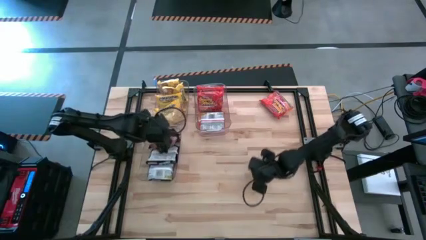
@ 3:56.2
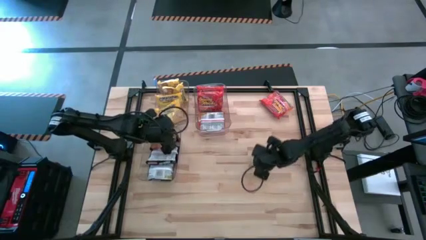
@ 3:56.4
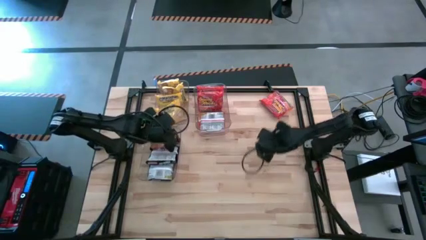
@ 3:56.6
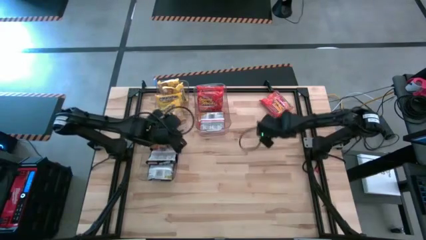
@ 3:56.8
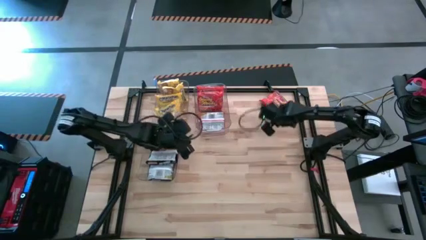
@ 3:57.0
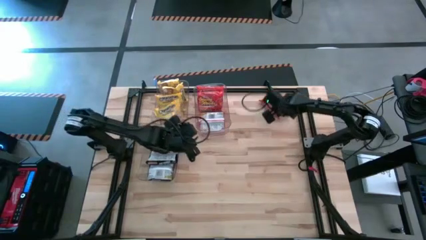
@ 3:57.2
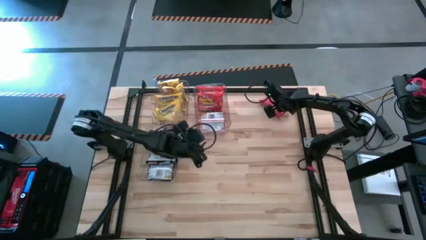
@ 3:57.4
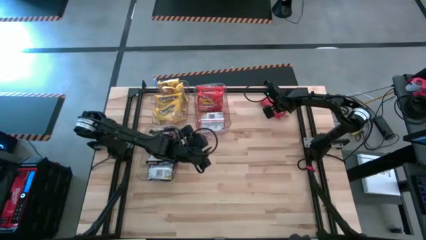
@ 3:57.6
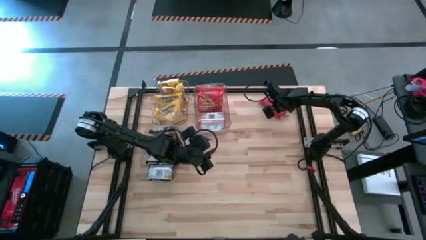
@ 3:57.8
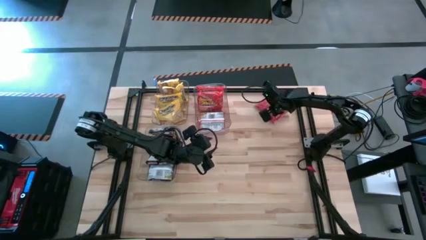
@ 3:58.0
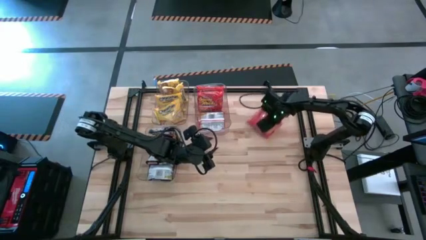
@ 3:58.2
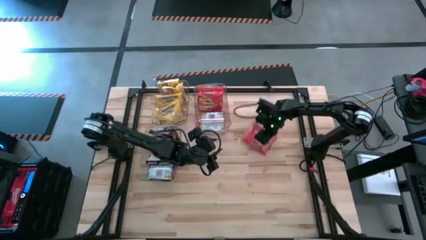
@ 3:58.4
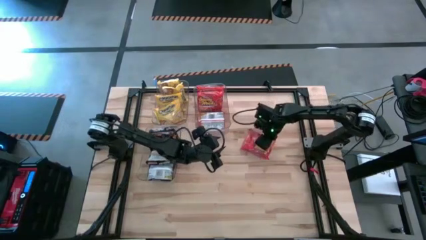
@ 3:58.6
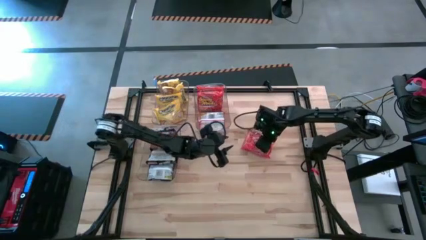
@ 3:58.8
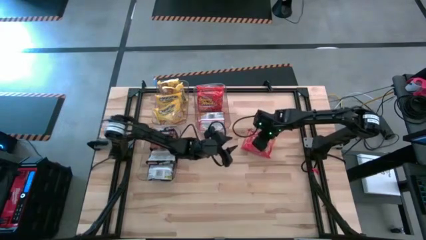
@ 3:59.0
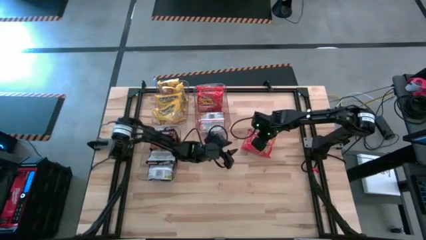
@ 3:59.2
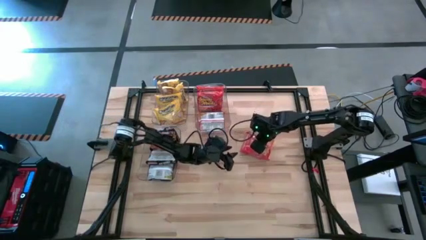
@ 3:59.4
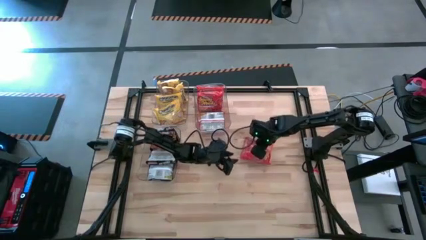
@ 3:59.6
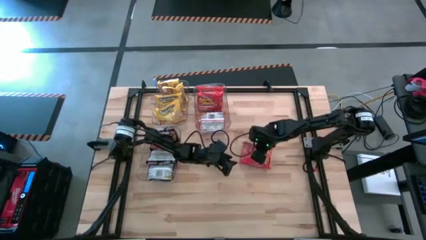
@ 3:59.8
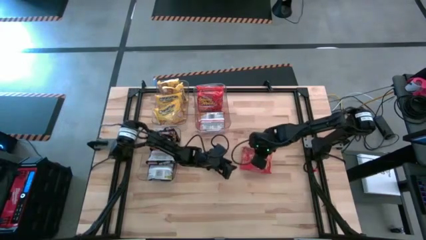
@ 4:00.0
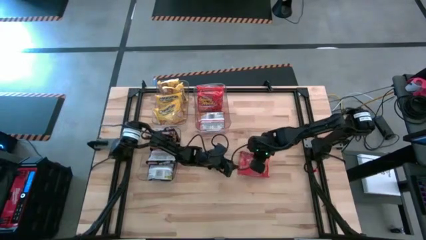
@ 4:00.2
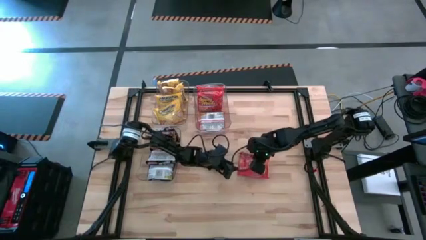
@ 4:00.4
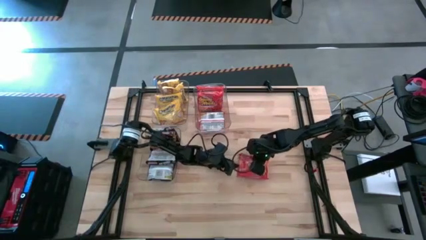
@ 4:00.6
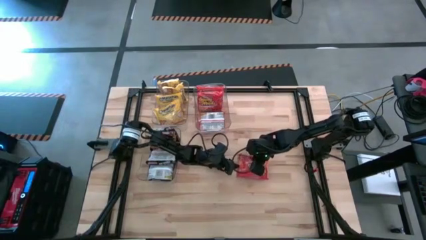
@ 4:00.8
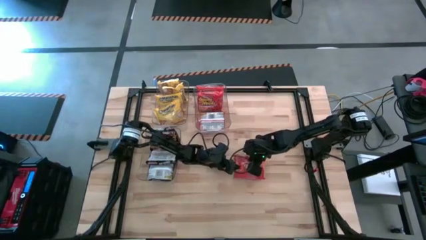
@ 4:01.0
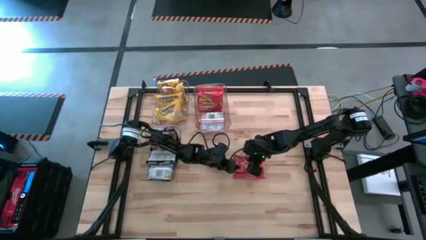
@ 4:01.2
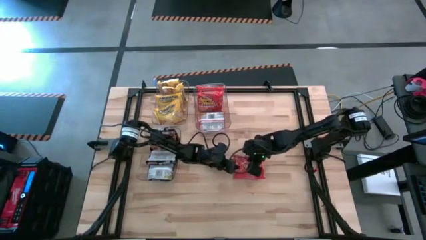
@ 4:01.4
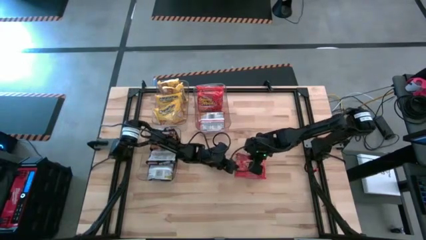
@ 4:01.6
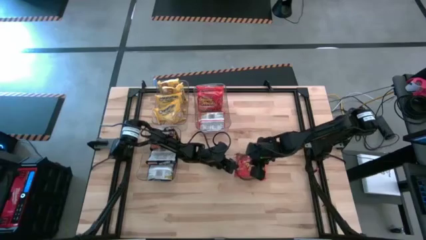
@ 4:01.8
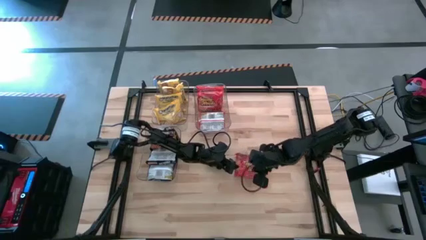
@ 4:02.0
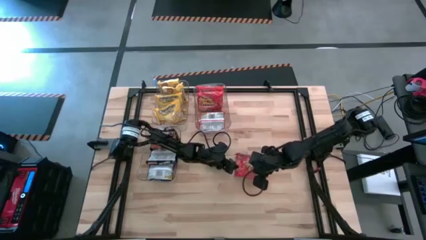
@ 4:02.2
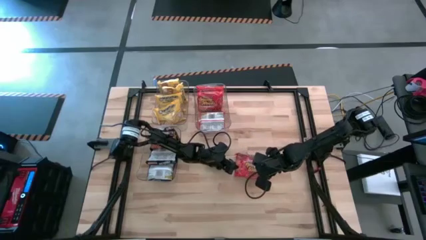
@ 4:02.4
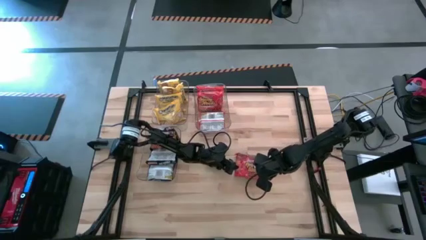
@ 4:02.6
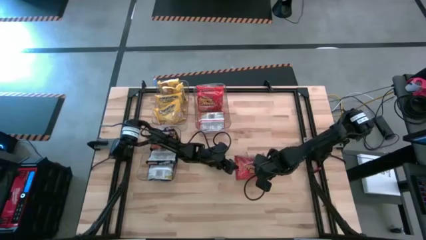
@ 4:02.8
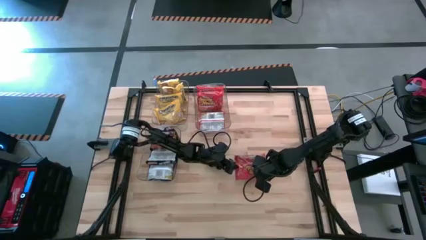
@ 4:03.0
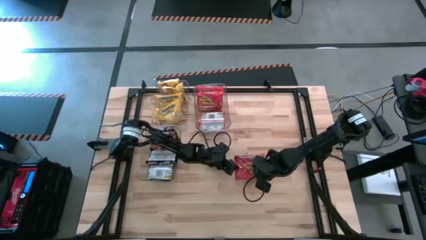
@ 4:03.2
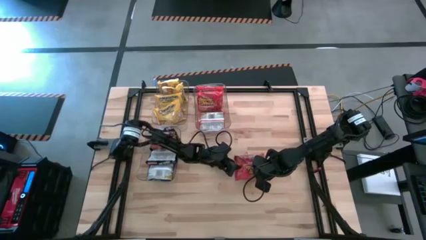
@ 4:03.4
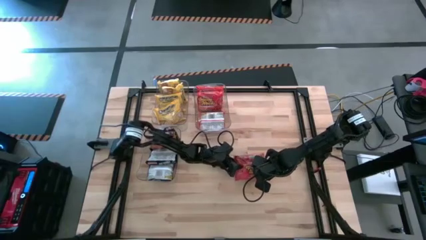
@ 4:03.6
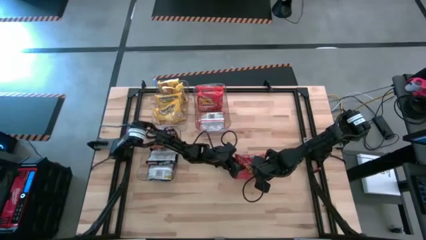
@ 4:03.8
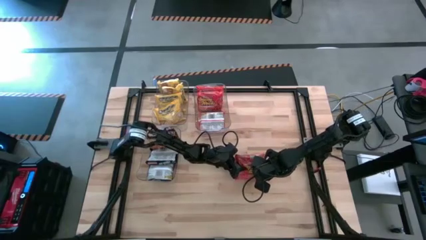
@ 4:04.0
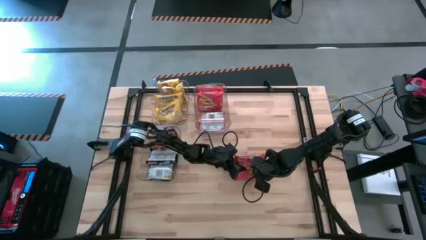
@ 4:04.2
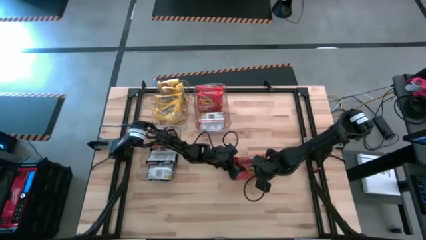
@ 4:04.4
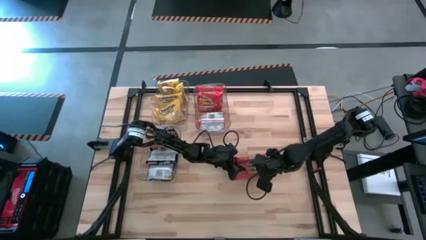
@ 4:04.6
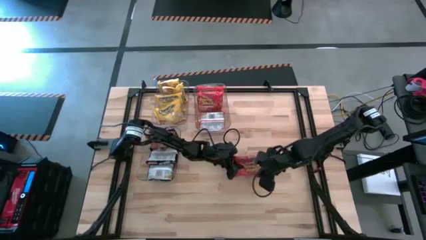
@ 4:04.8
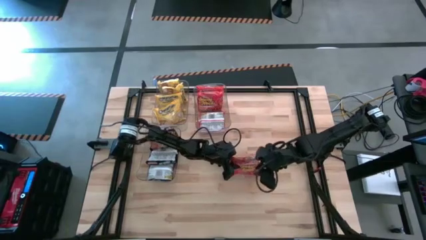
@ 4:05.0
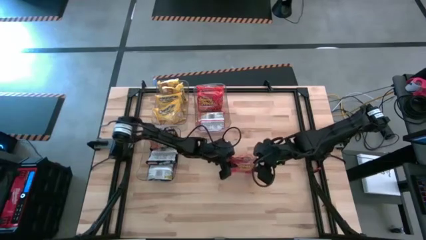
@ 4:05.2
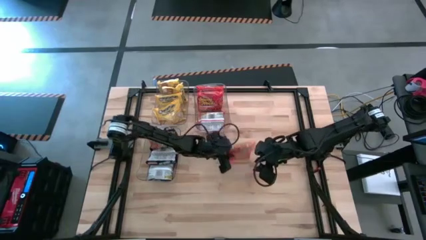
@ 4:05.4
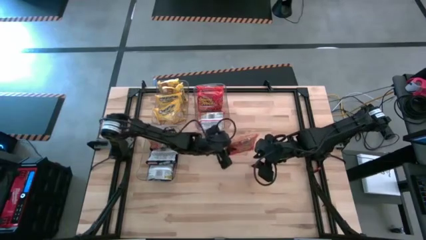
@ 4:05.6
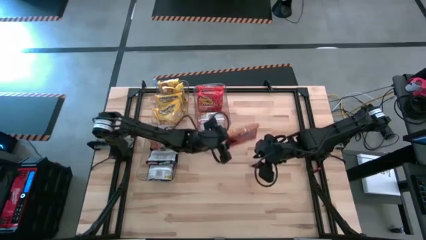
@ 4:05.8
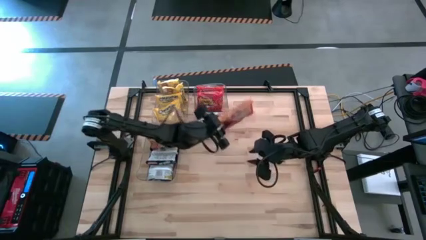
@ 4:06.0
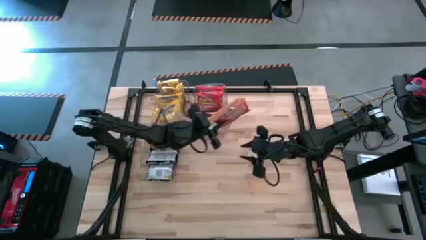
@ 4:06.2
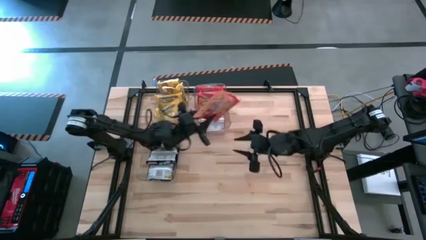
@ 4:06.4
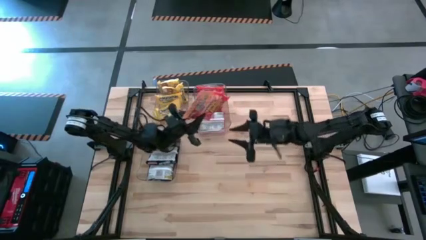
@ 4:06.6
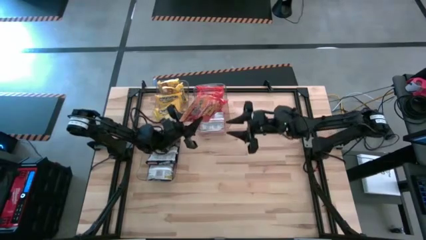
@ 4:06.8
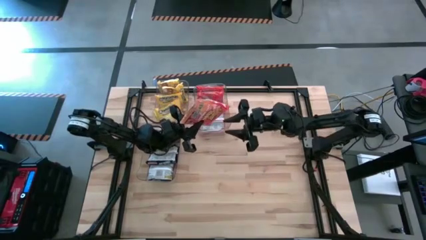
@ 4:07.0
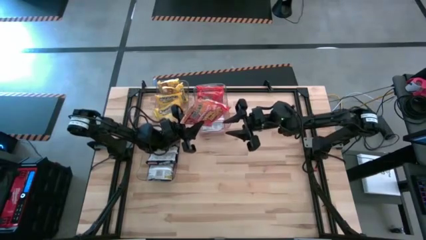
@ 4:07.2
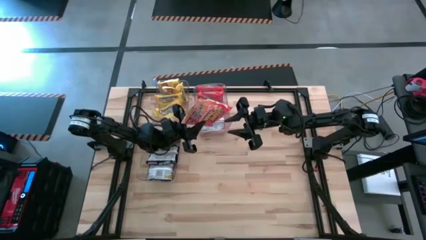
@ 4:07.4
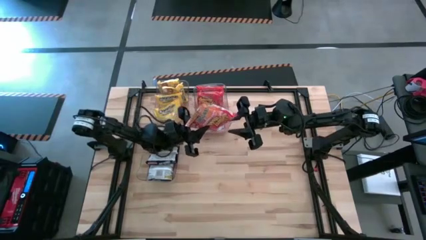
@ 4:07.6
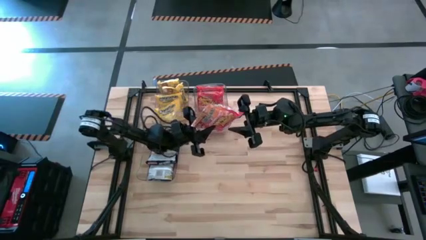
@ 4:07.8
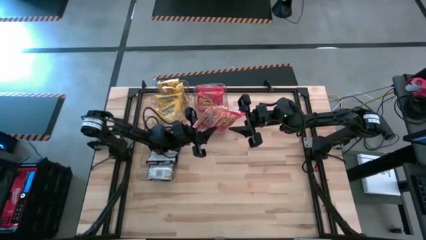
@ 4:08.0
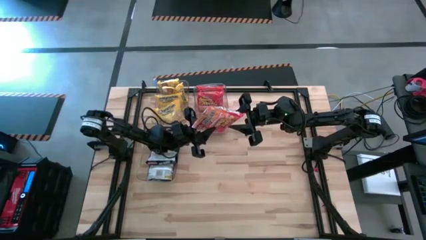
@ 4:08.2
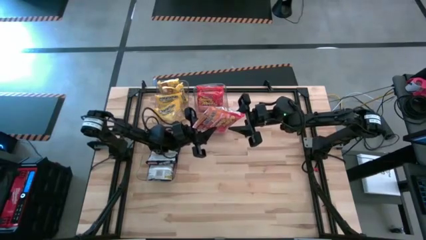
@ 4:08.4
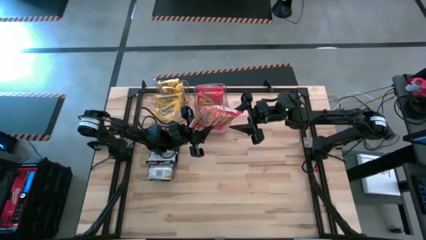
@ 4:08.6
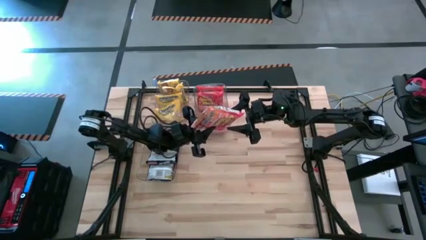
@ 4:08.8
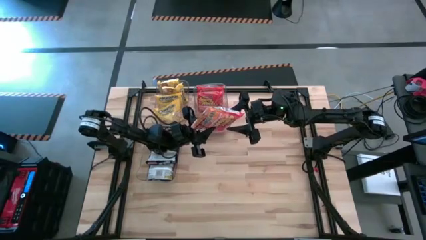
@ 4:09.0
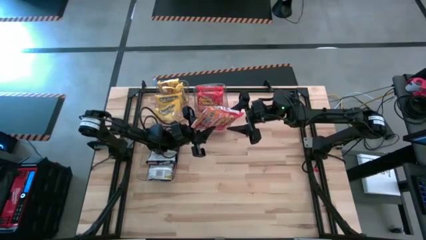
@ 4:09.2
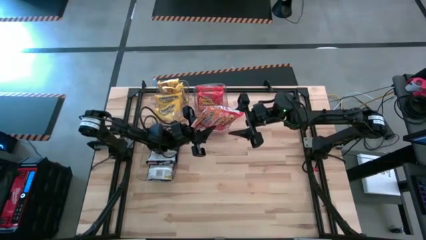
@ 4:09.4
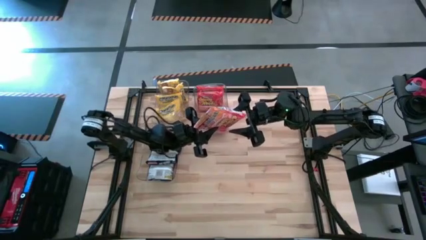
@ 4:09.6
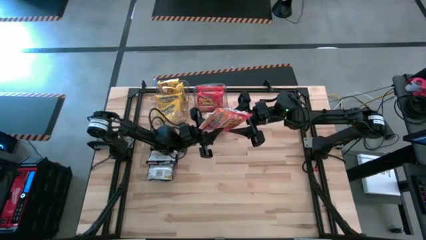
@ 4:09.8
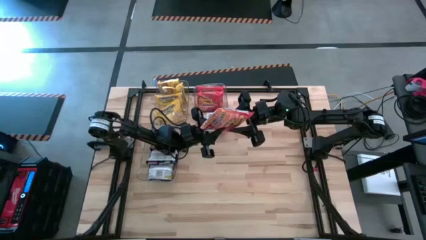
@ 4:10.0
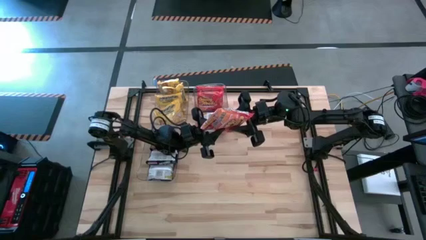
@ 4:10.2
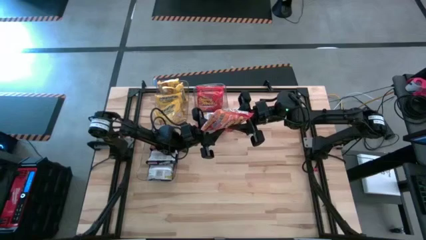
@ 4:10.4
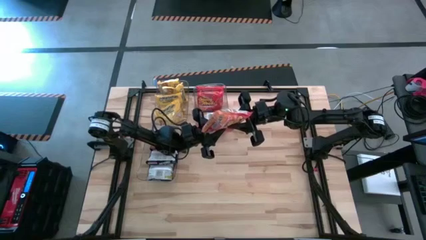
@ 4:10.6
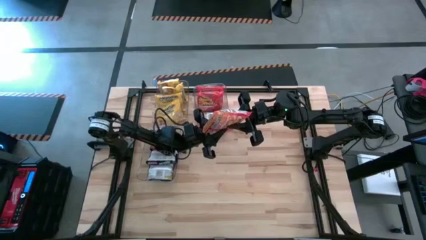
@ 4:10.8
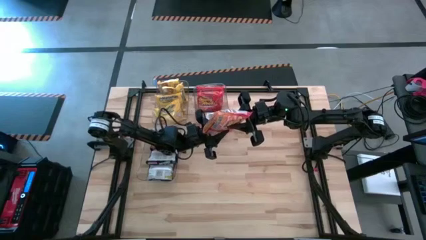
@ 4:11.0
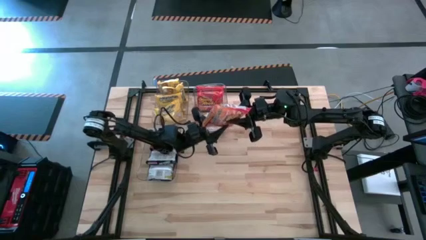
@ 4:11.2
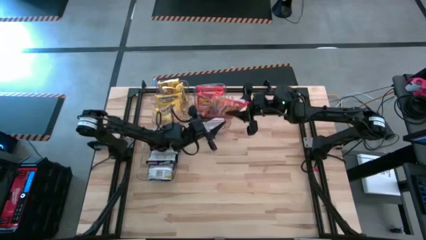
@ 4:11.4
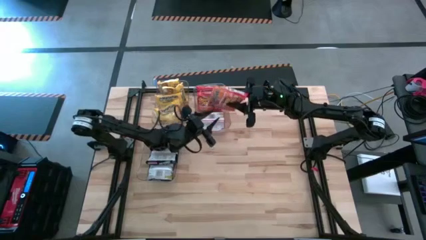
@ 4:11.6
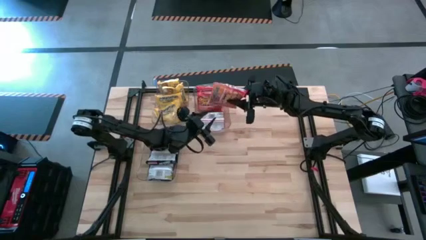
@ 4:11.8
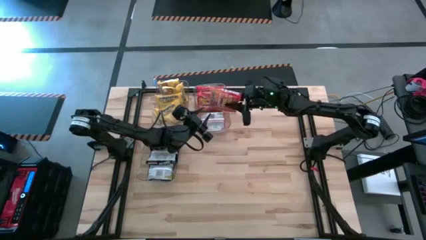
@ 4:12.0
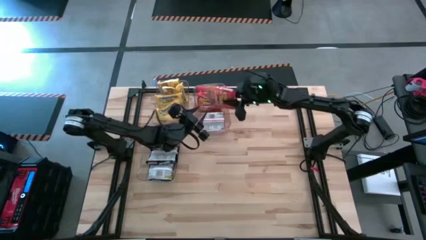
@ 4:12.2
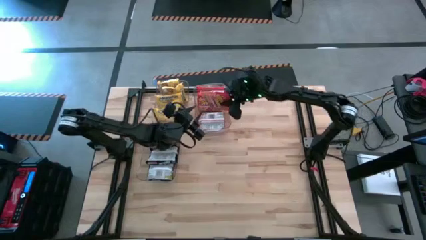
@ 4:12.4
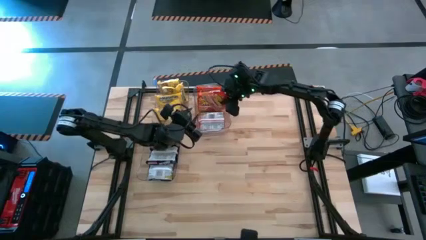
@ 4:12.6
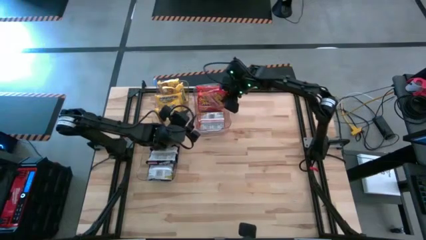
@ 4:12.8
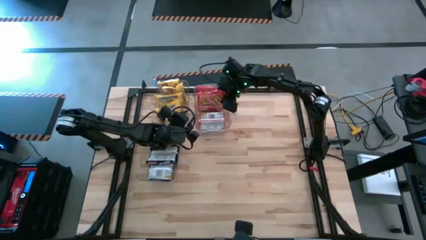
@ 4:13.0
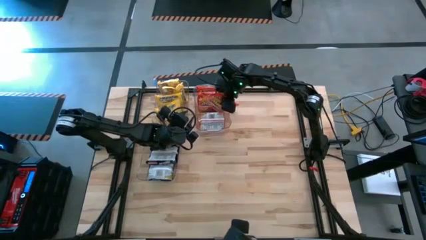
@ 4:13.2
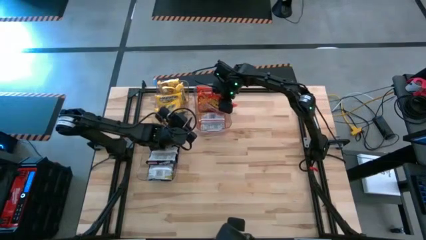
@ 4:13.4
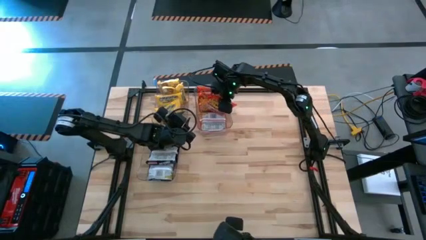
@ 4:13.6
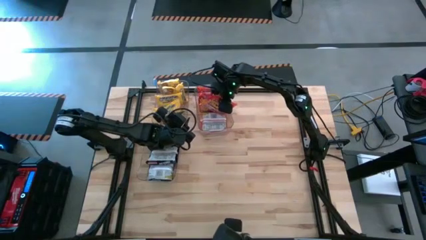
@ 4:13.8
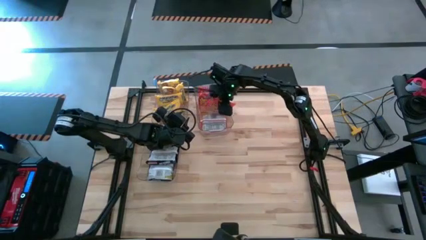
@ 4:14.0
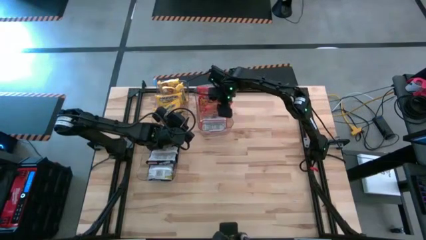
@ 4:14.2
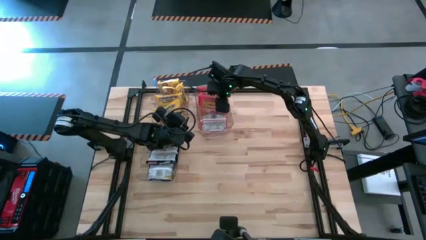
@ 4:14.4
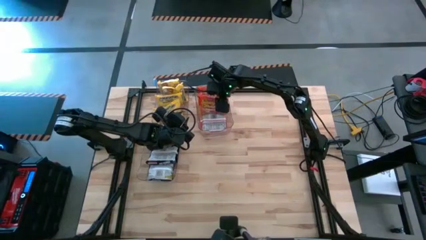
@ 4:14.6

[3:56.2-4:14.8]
Task: Sort Maruchan noodles
Put the orange noodle pack into the top right transparent bin
